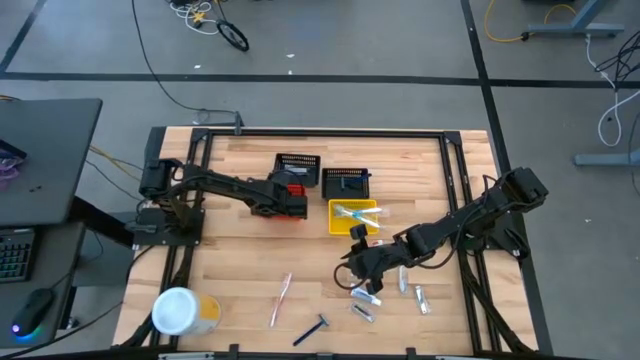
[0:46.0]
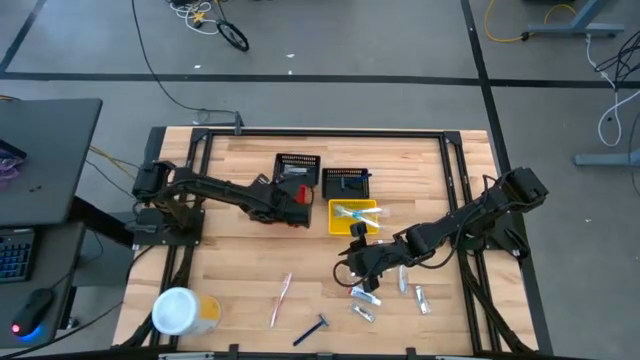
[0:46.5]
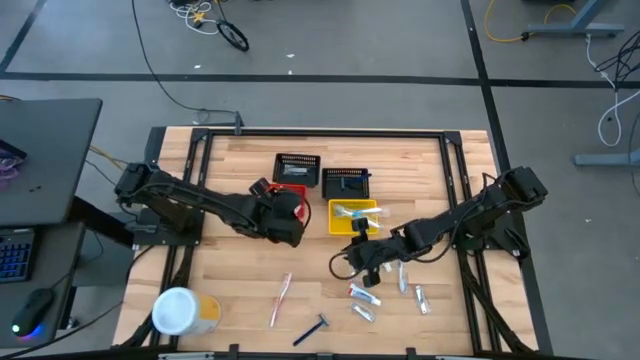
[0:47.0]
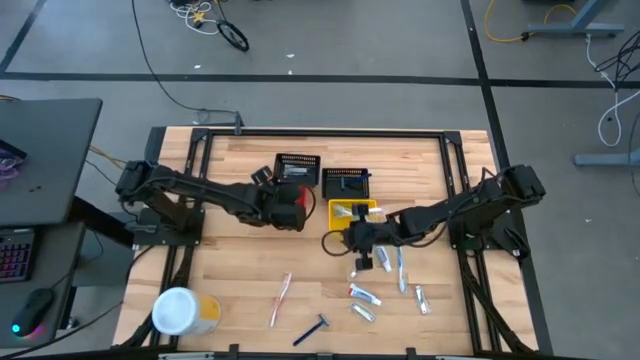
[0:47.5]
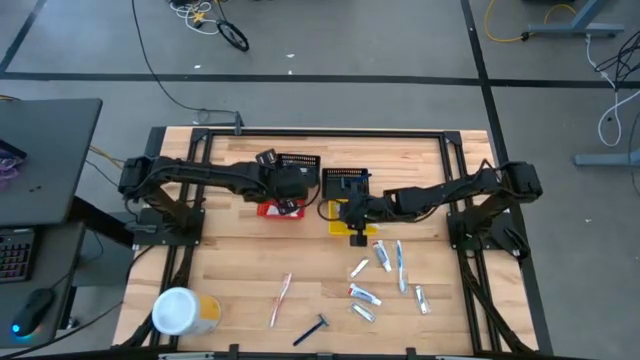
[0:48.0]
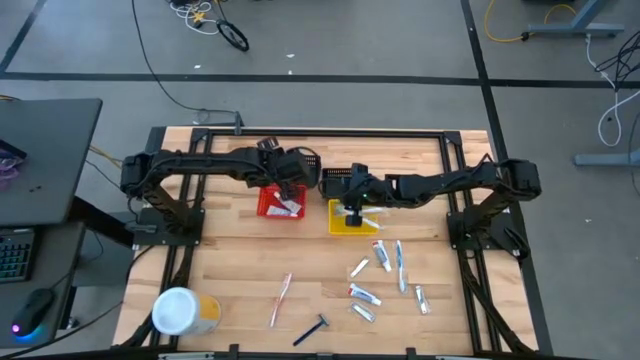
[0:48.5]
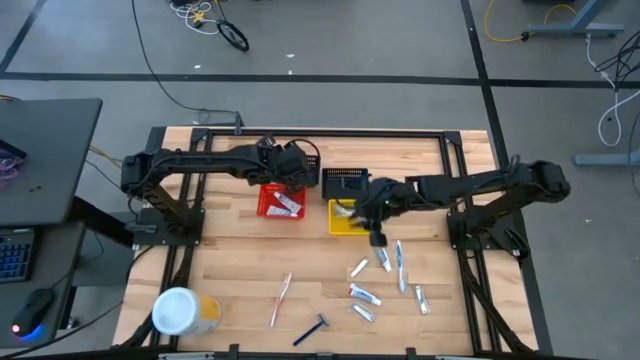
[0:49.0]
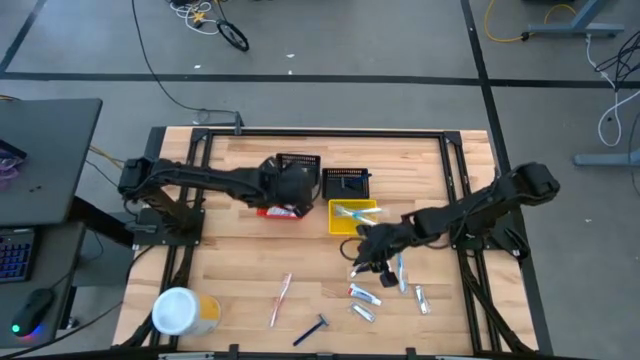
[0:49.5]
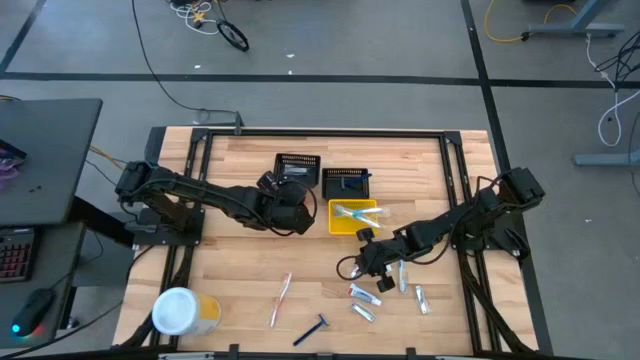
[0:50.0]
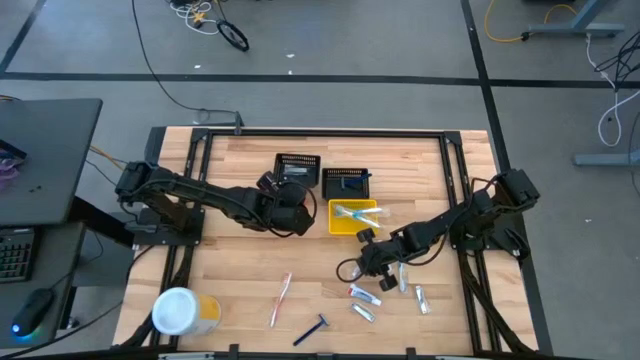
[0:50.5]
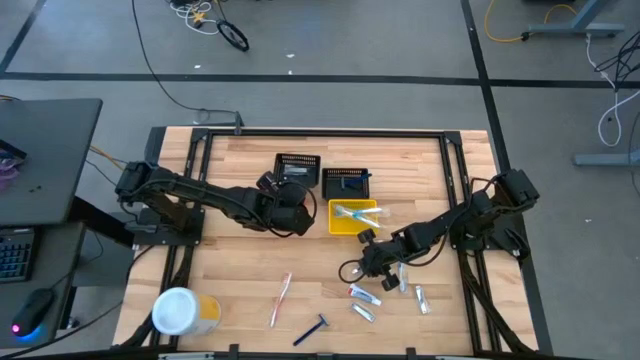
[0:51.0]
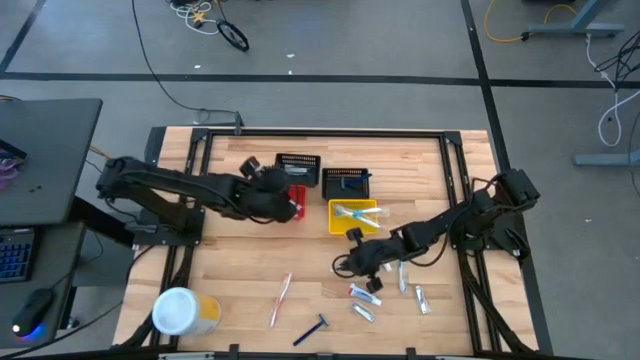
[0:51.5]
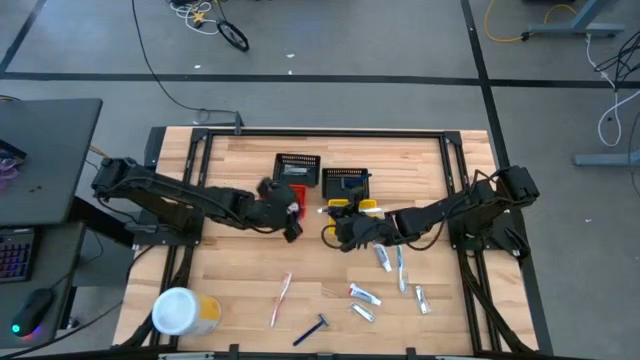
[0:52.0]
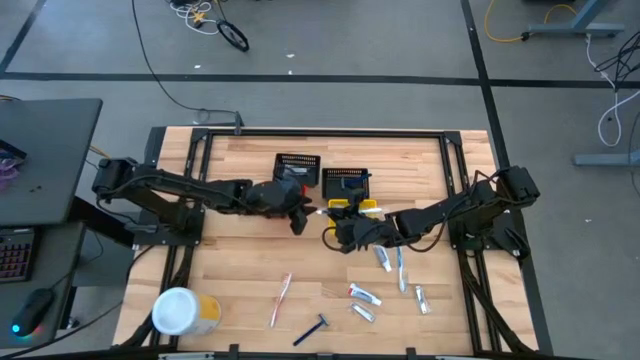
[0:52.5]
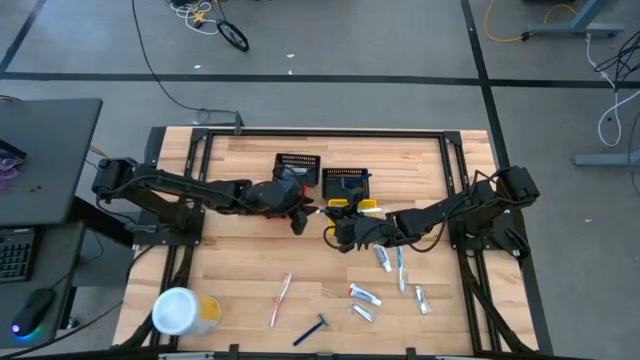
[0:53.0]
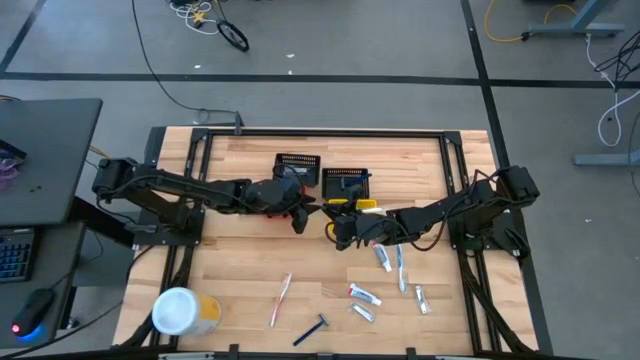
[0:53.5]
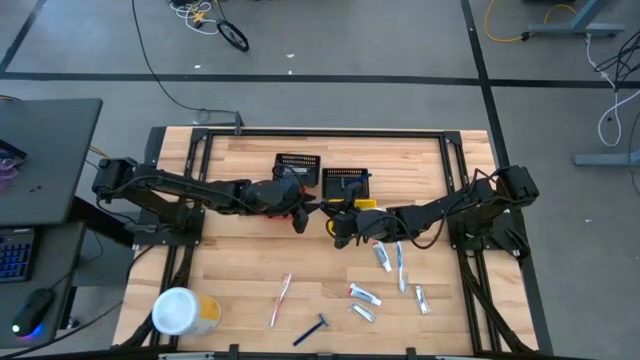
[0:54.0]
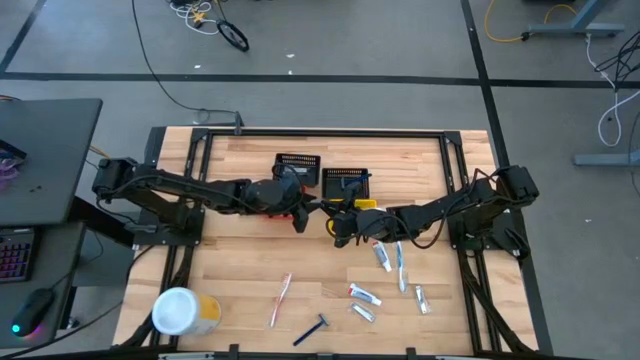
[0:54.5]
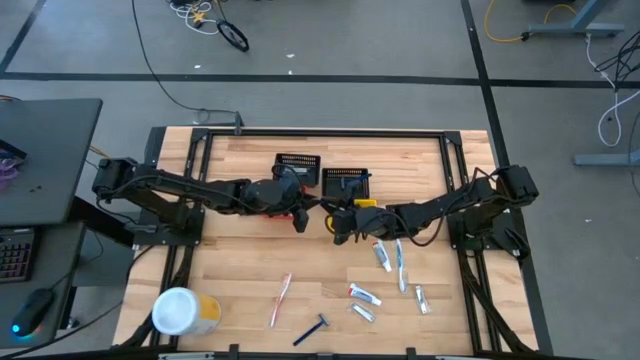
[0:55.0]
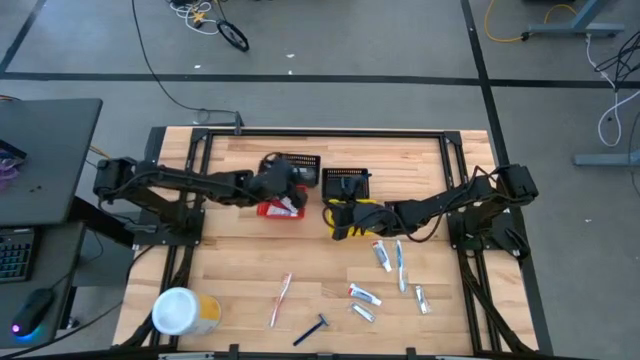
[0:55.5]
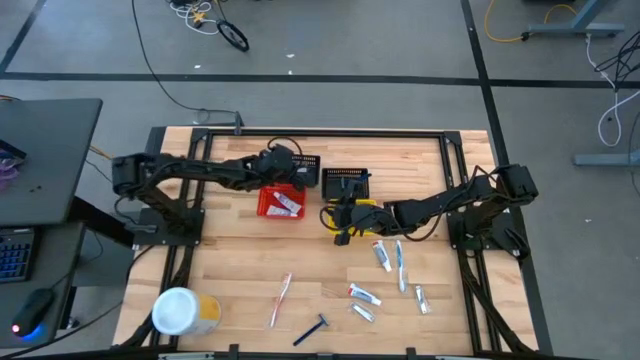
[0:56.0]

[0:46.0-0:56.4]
Task: Pick & Place Travel size toiletries
Put the silver nail cutter into the left black bin

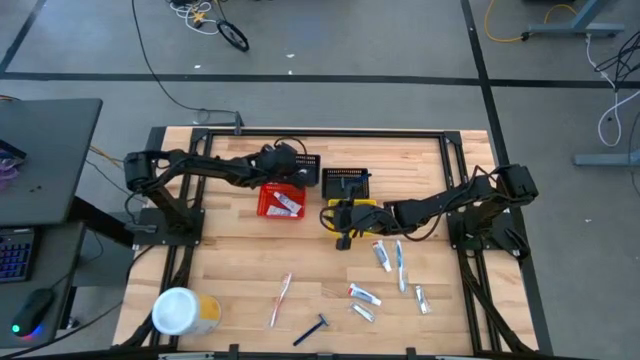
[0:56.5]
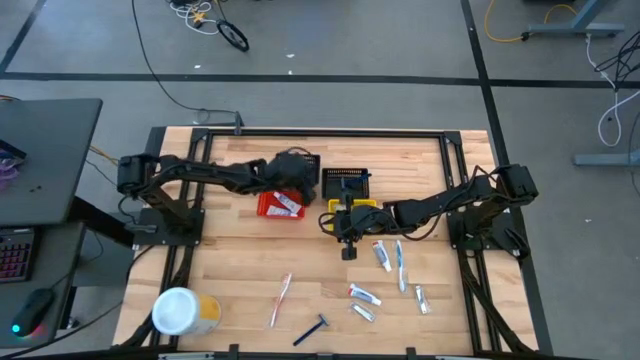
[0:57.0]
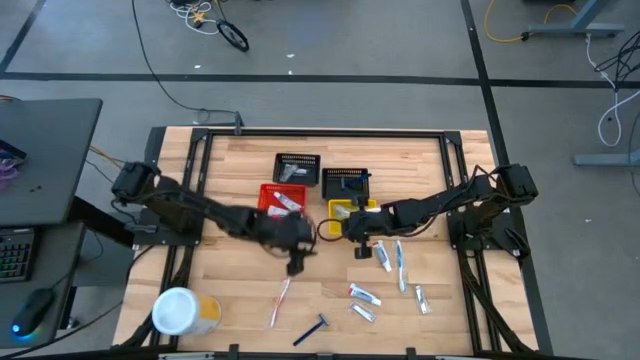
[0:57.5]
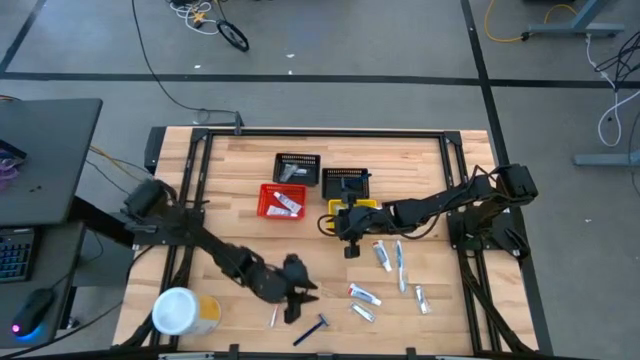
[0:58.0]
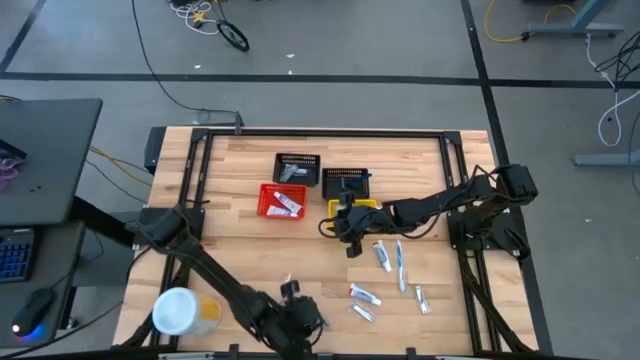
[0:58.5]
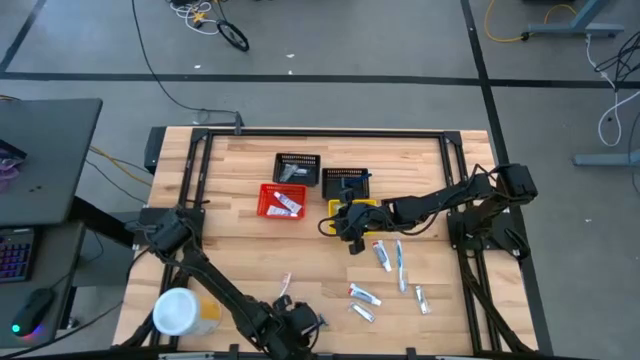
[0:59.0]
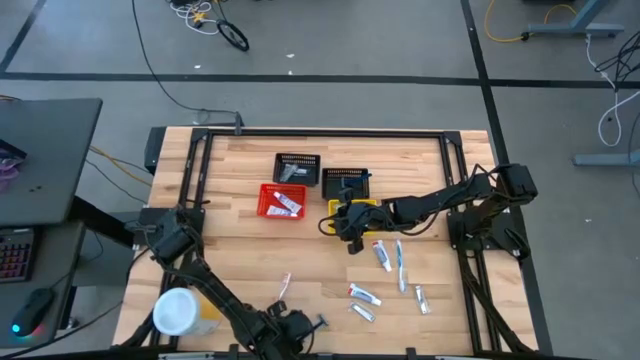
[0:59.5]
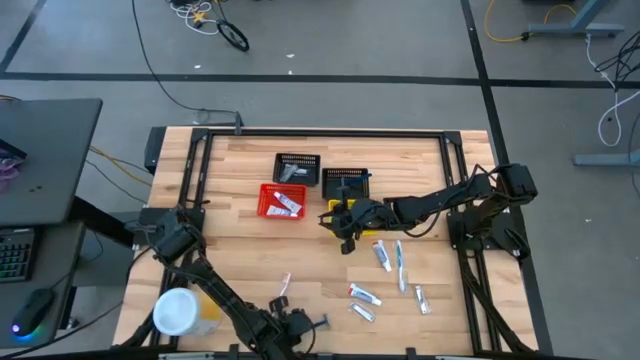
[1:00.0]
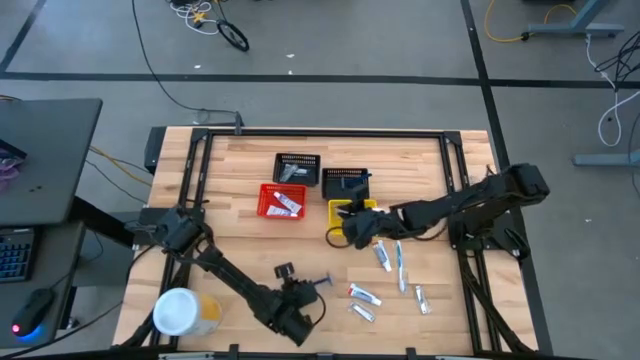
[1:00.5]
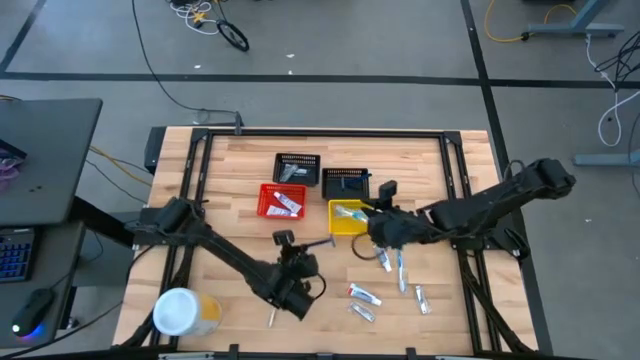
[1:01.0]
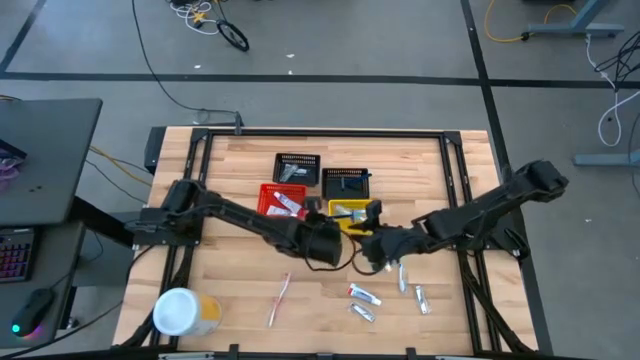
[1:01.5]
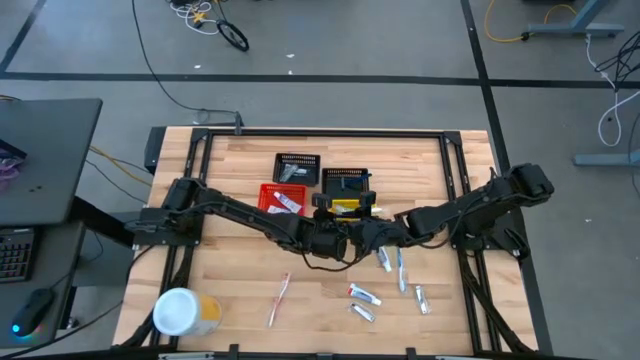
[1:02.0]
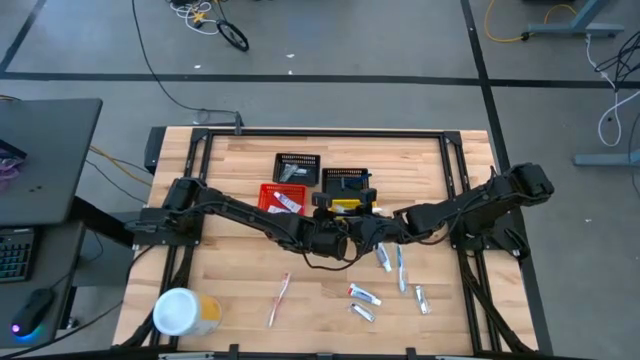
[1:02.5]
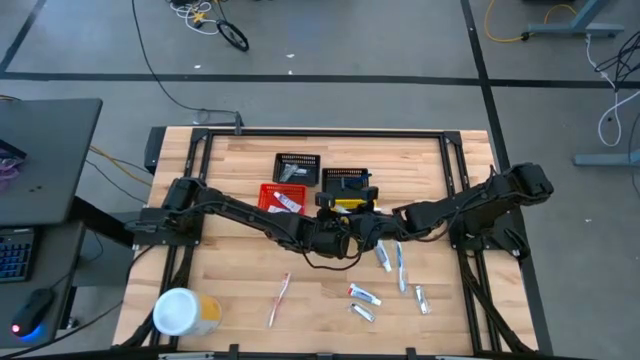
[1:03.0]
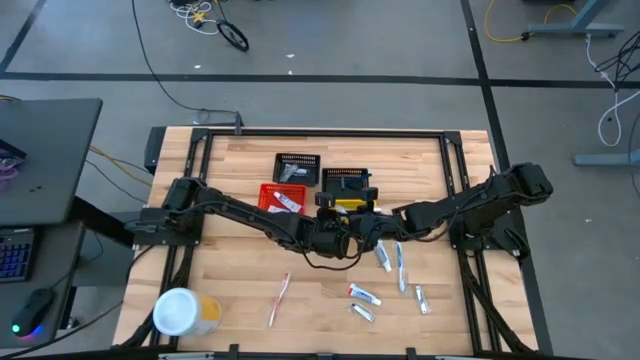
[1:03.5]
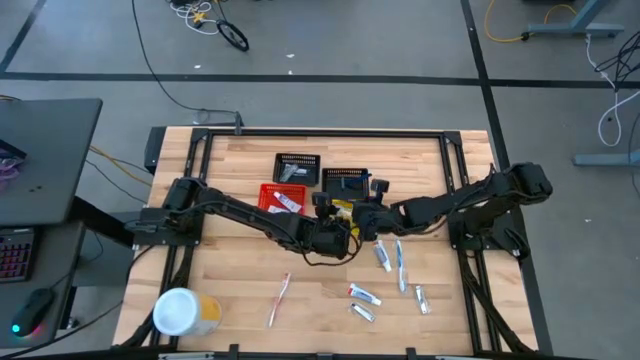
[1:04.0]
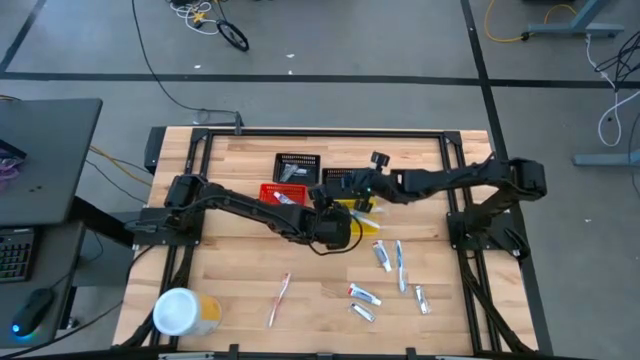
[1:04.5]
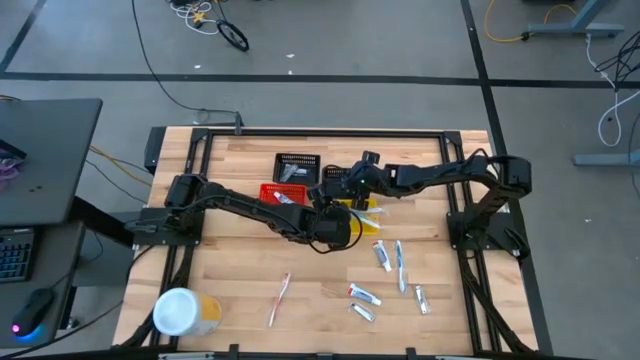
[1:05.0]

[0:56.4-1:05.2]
Put the blue razor into the right black bin

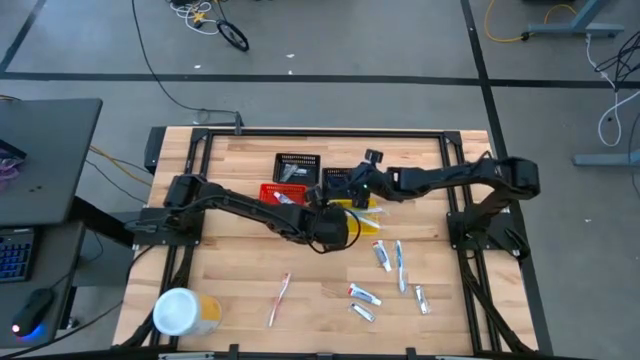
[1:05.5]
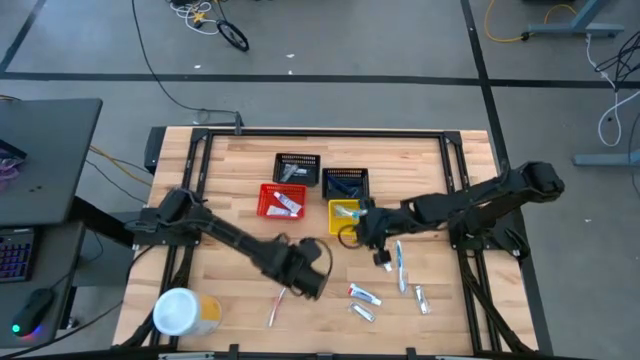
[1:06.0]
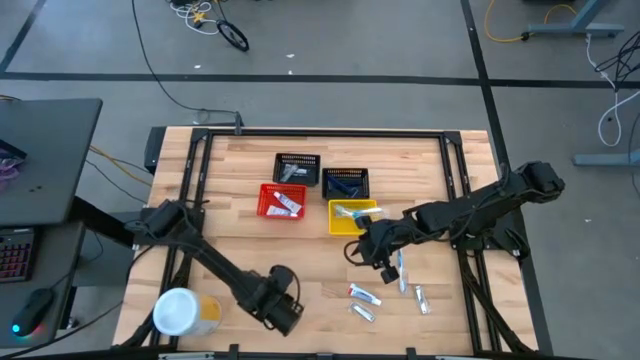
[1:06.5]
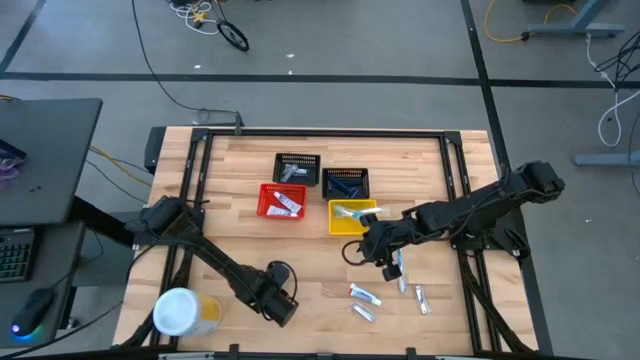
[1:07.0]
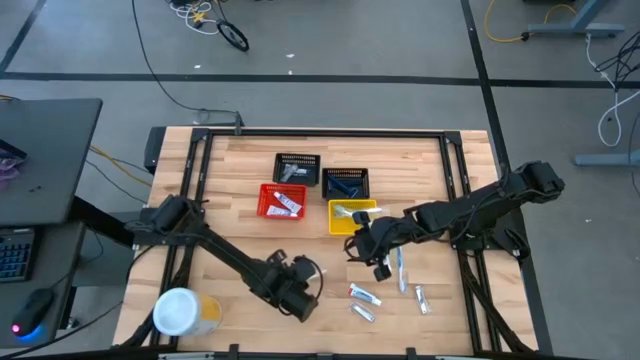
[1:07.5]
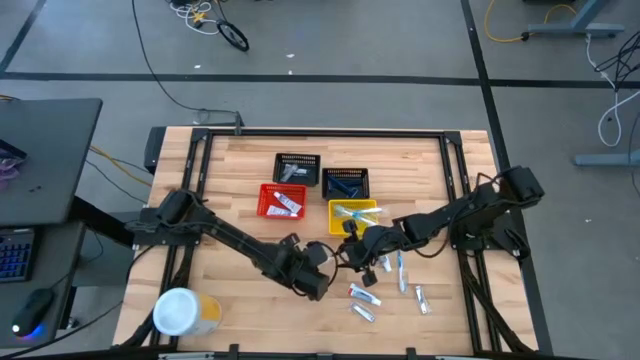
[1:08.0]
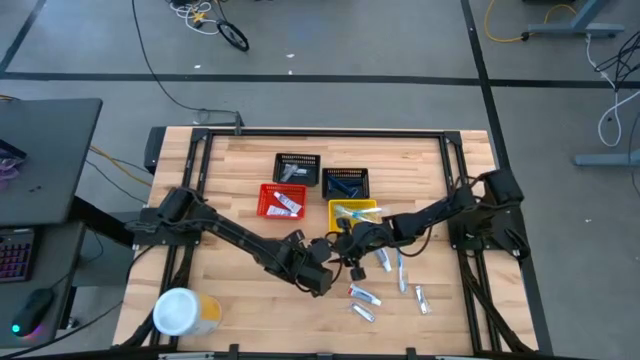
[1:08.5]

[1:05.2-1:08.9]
Put the orange toothbrush into the yellow bin
